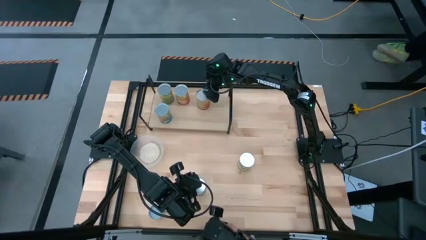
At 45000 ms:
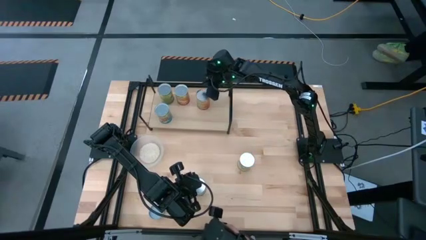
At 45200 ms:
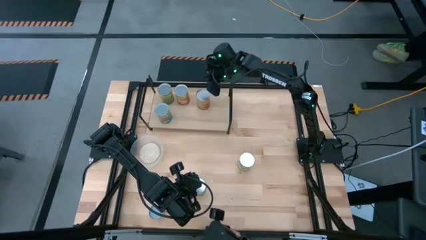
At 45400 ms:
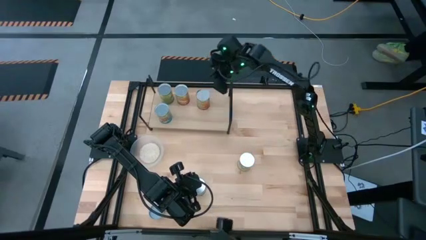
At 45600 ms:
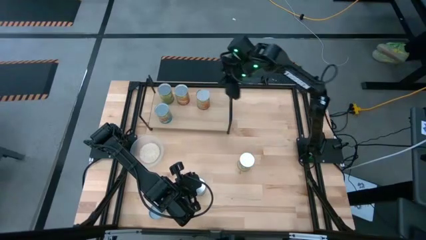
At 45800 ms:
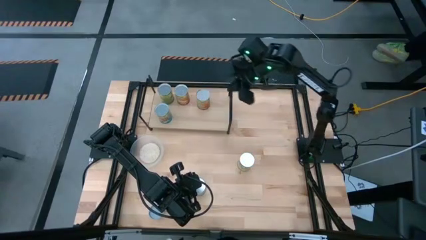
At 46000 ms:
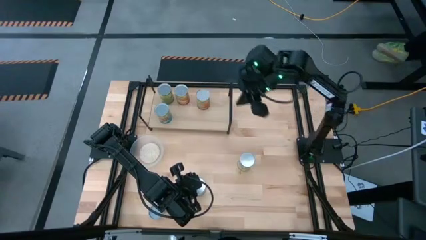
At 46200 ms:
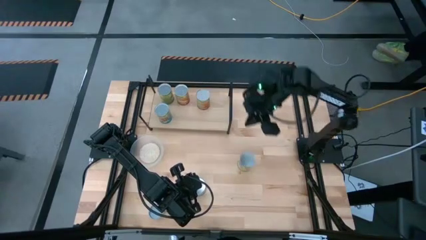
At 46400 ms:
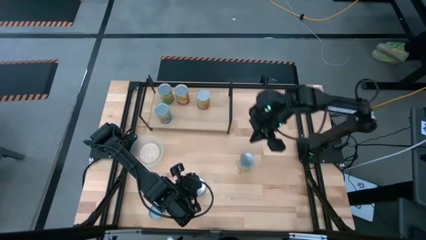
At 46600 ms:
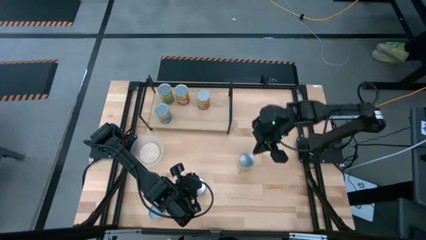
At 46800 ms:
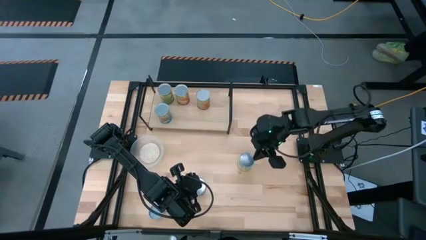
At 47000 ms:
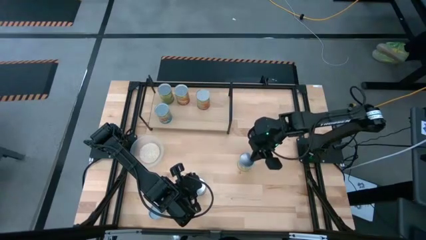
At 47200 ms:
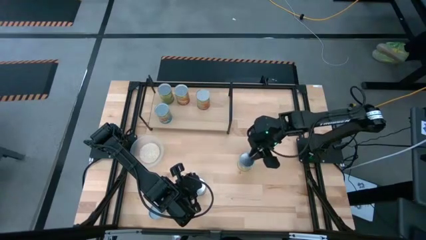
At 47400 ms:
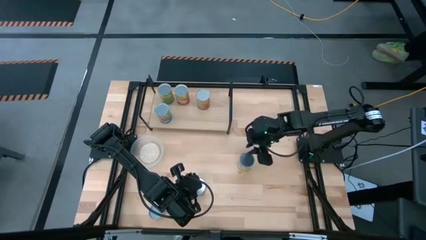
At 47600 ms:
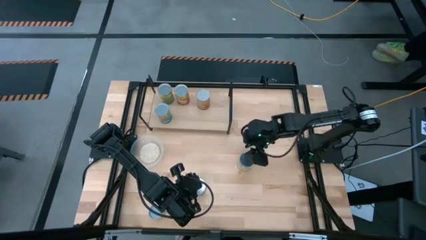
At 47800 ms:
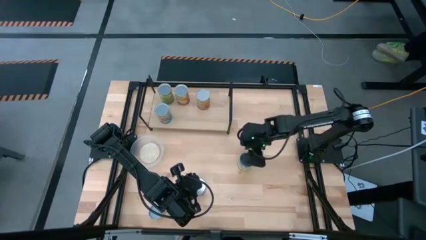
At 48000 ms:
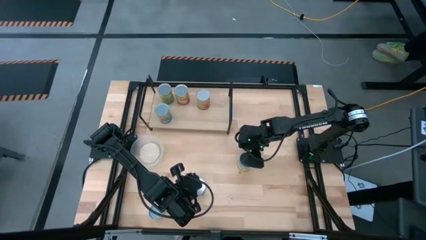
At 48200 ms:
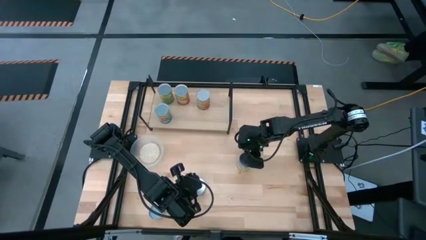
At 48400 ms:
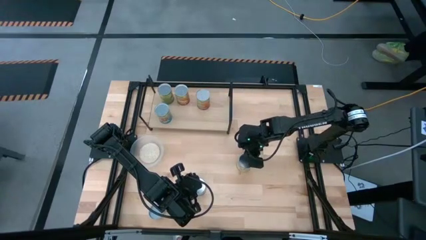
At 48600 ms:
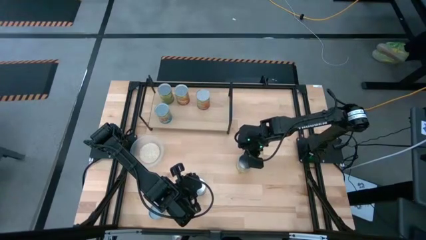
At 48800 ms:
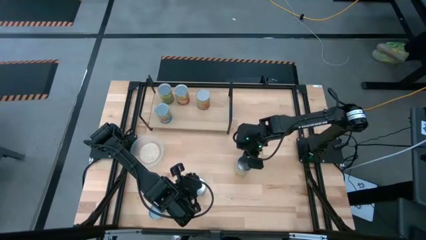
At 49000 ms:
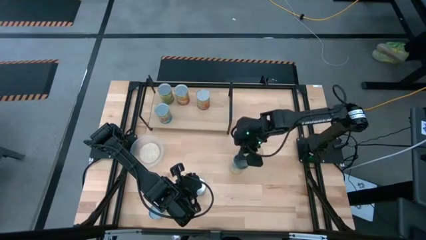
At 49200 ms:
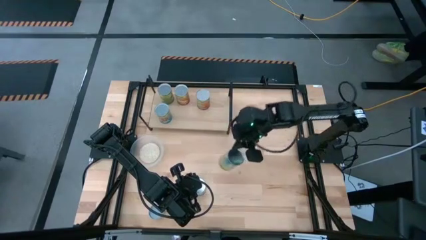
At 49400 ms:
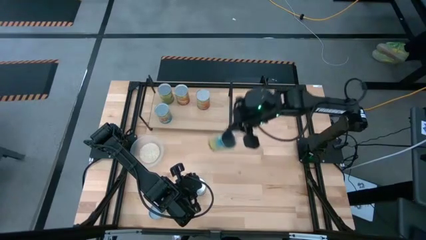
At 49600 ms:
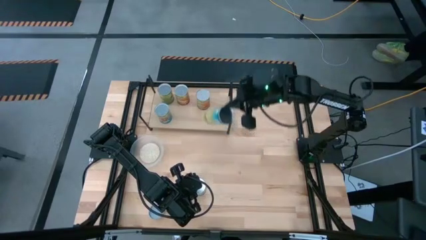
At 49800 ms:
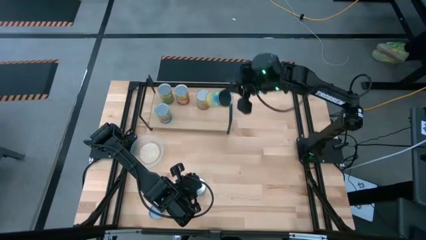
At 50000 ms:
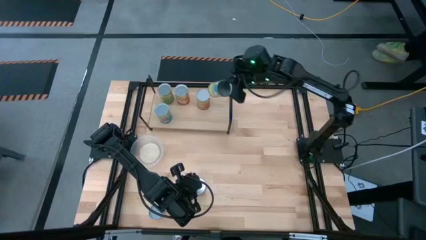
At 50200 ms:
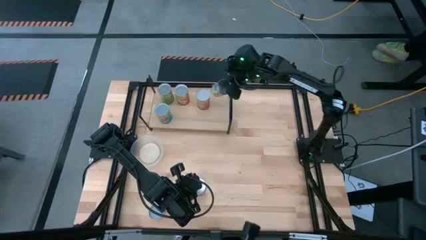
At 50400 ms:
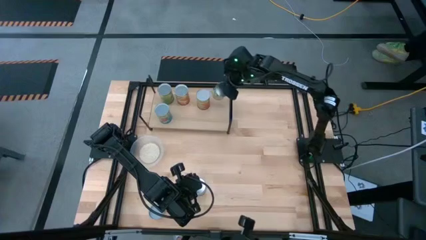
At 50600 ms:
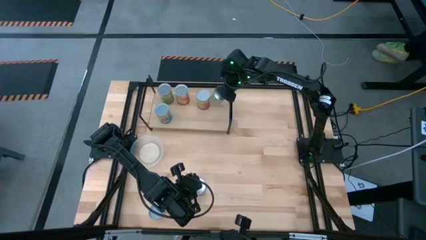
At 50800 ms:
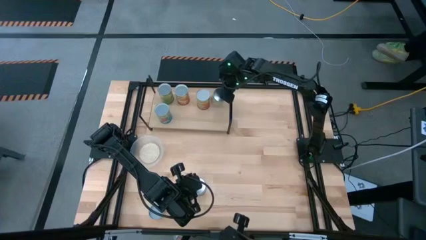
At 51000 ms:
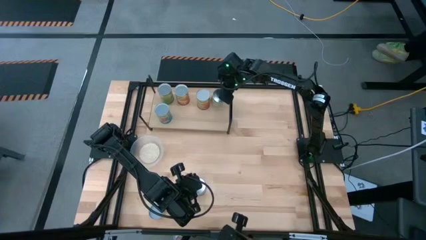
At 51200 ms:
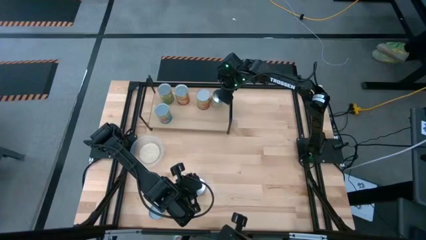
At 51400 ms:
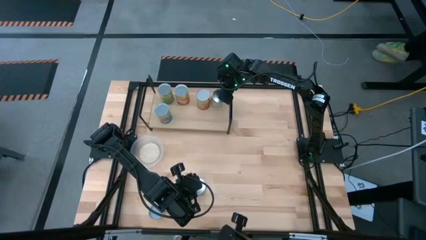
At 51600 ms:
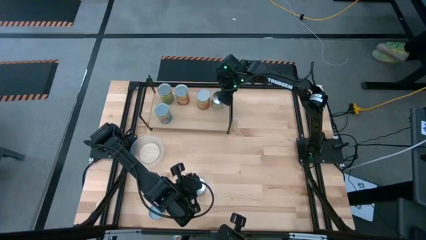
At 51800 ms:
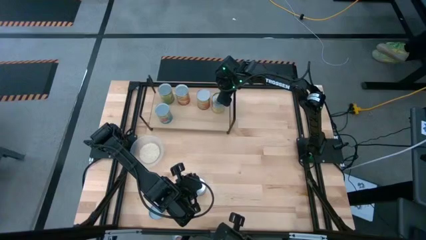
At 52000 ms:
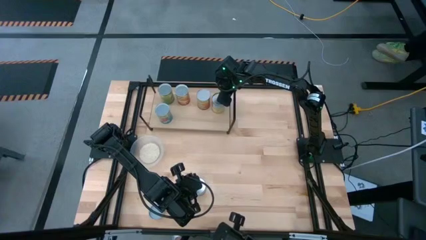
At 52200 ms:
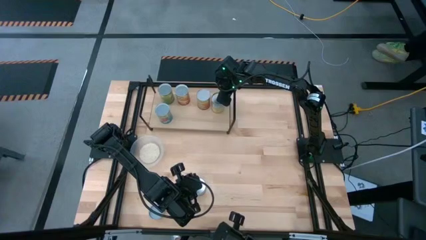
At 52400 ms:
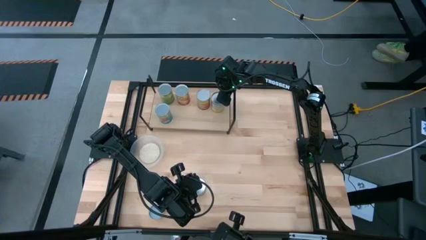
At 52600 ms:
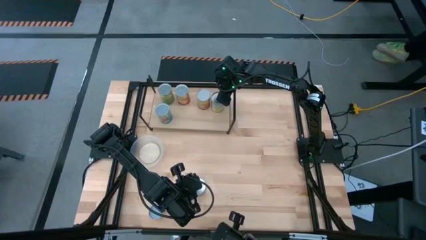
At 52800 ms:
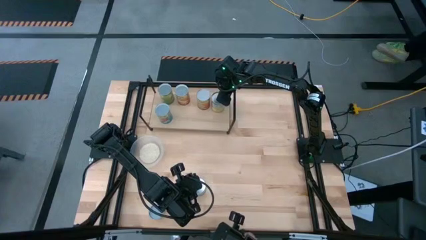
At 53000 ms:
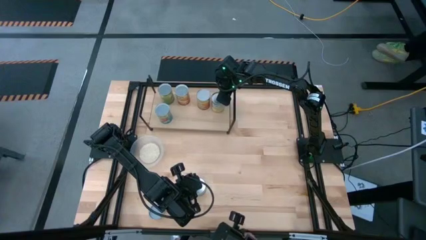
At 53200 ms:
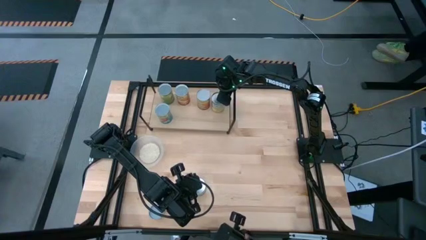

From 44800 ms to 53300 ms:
Task: Pick and place cans onto a shelf
Put the carrots can on the shelf

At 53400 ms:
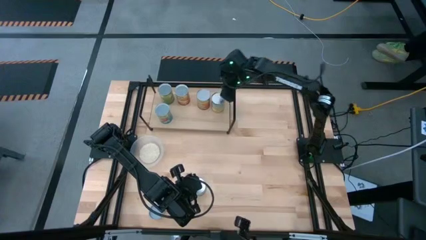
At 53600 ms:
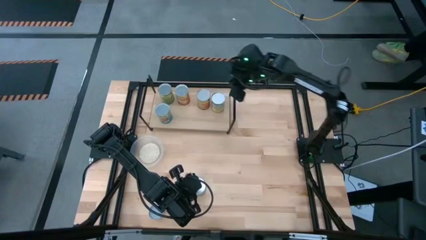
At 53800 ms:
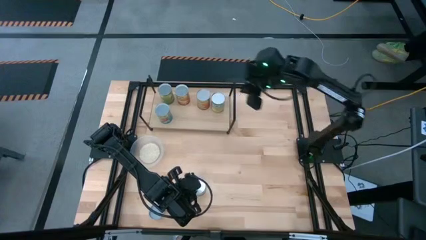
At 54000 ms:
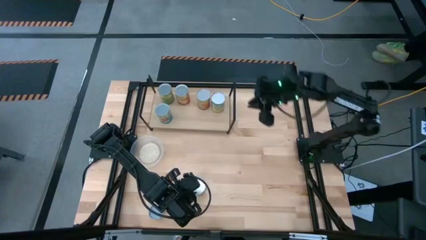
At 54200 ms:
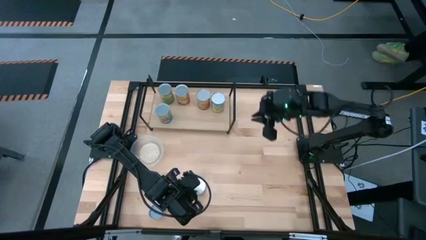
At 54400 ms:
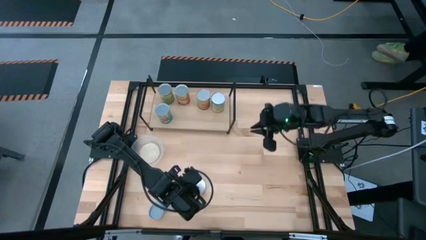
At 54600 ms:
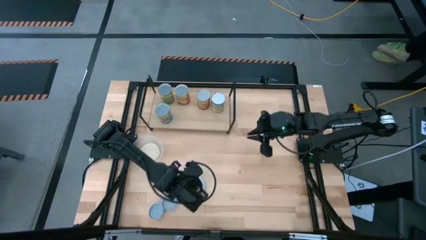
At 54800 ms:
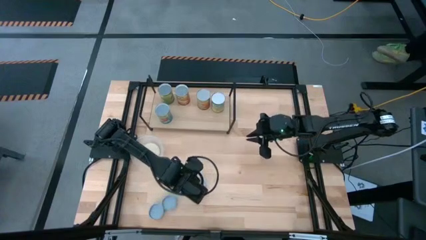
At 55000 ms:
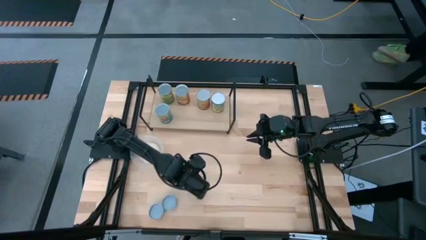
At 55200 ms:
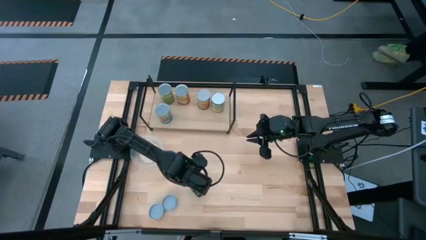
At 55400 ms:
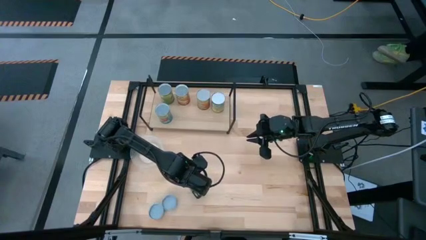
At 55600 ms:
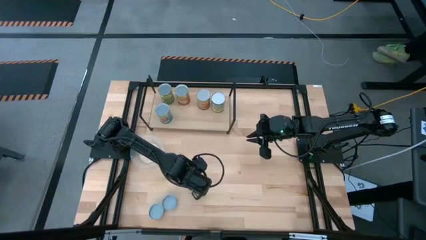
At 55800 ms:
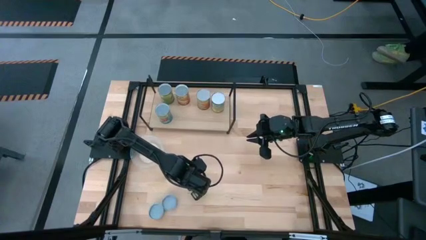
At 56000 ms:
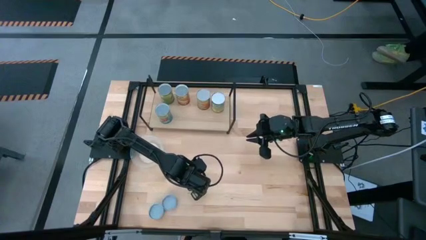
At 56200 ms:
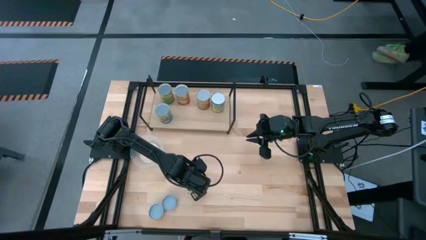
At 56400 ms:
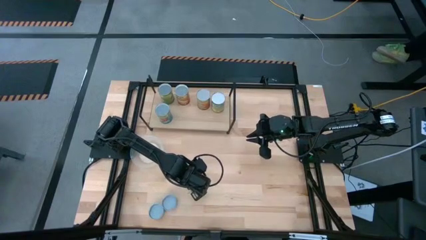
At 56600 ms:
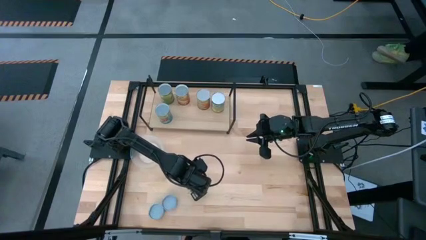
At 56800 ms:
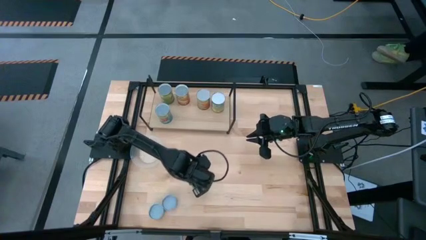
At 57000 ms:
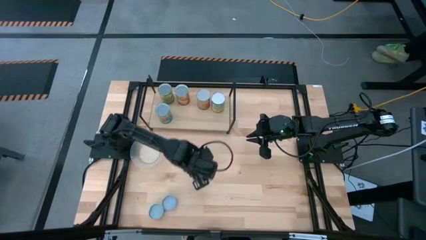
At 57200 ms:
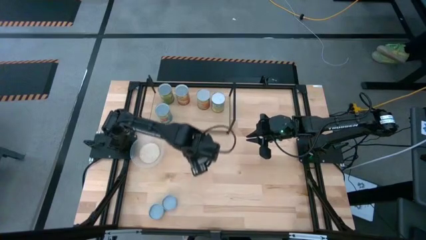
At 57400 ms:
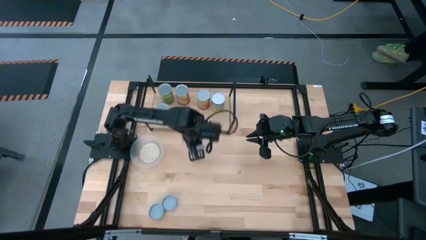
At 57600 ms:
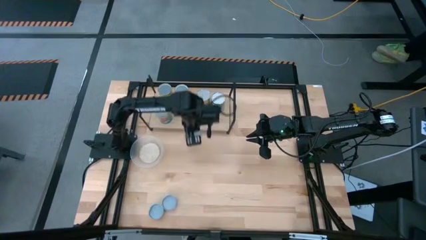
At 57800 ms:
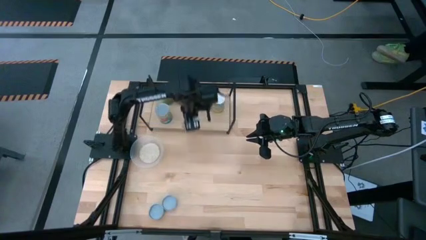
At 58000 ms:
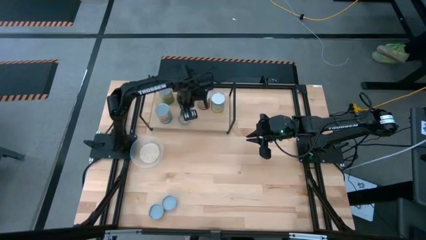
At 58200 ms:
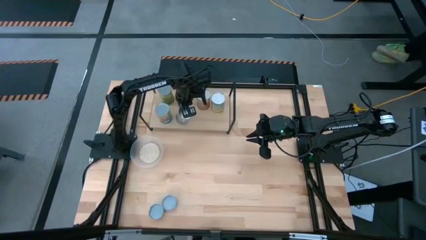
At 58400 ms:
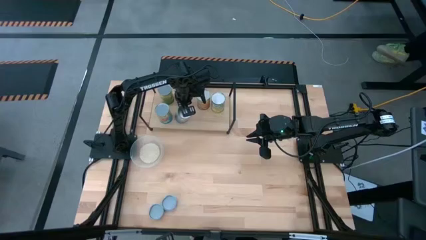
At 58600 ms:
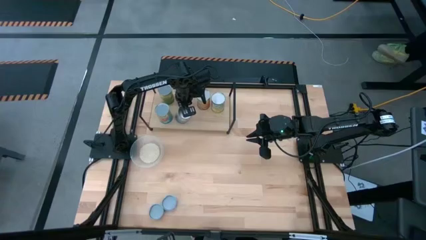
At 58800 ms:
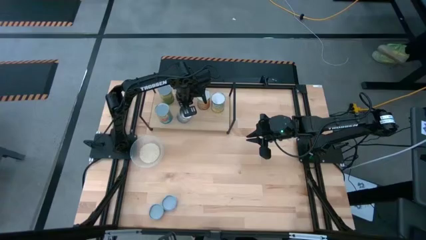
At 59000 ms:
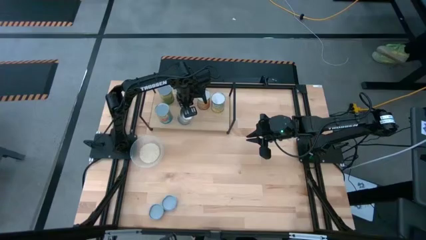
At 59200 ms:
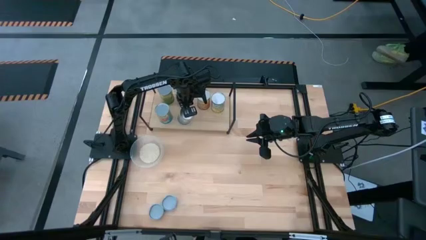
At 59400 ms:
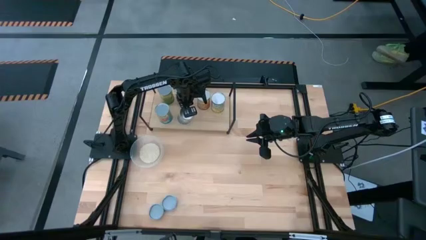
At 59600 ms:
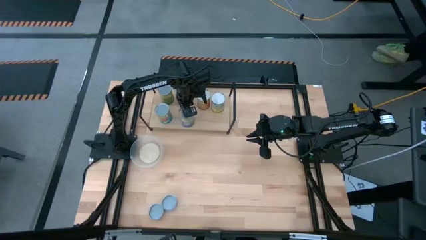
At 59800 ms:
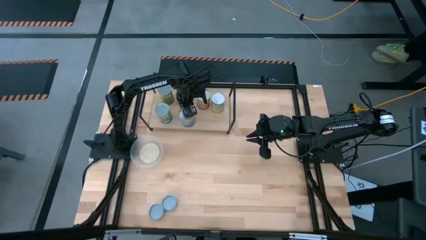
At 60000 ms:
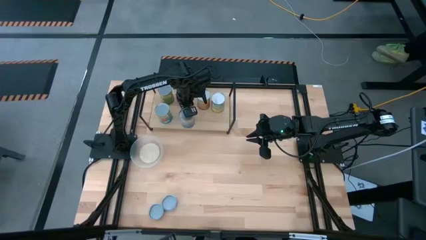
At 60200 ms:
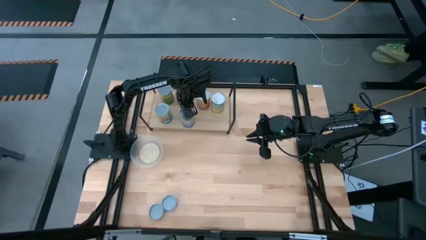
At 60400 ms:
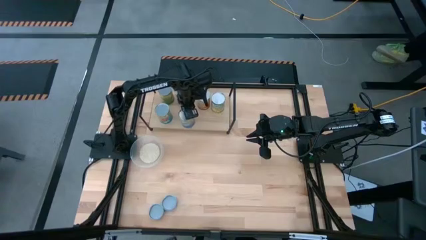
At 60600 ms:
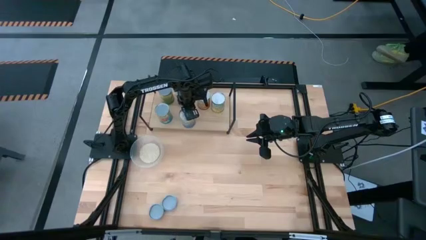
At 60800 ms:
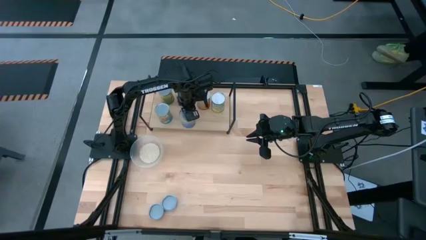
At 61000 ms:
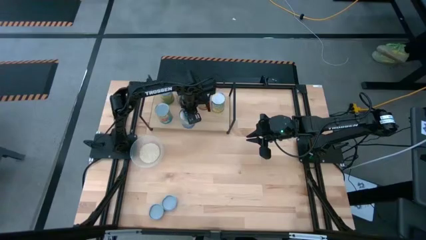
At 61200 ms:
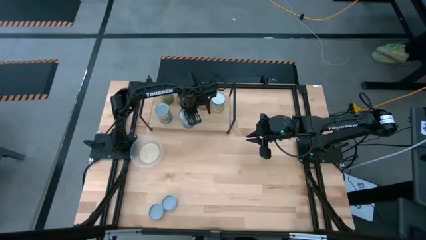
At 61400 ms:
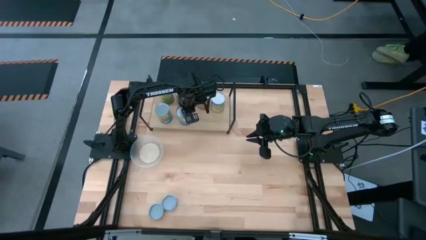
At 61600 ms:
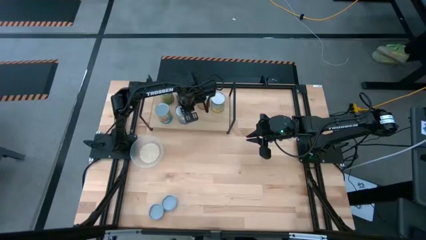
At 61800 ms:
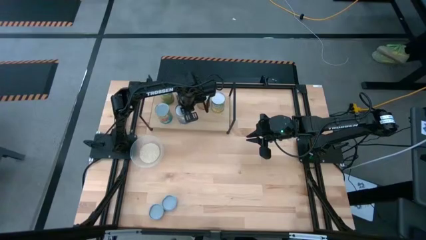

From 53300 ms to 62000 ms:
Put the peas can on the shelf
